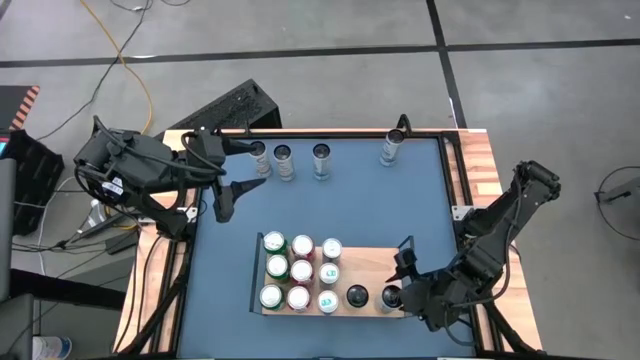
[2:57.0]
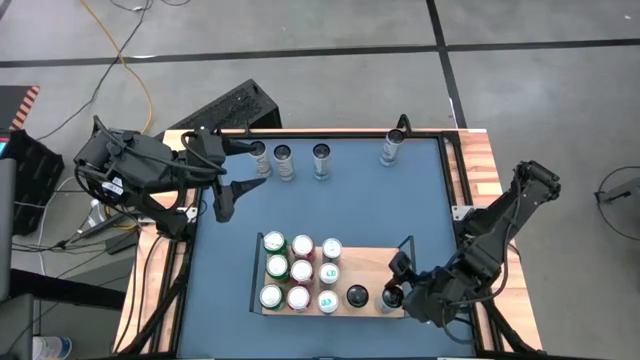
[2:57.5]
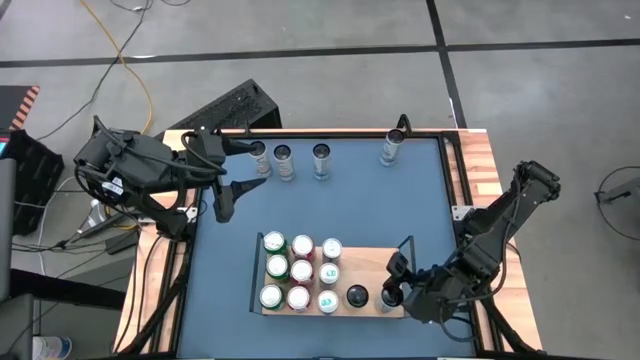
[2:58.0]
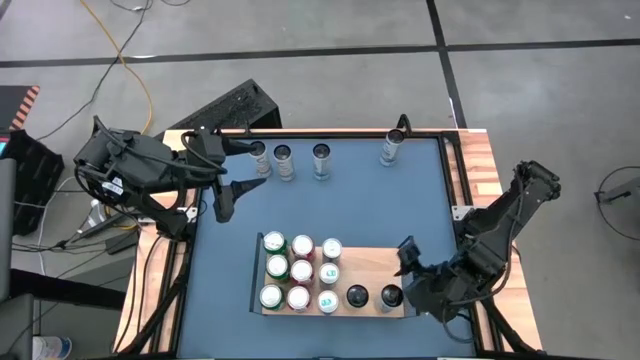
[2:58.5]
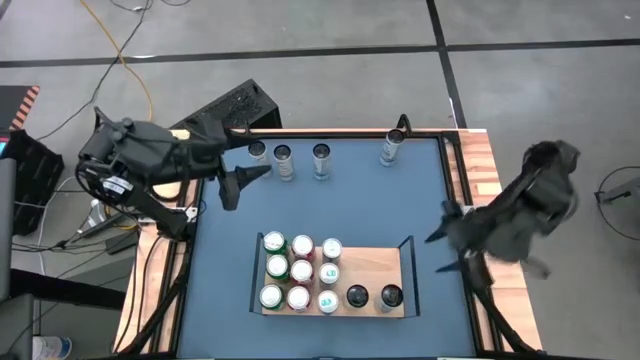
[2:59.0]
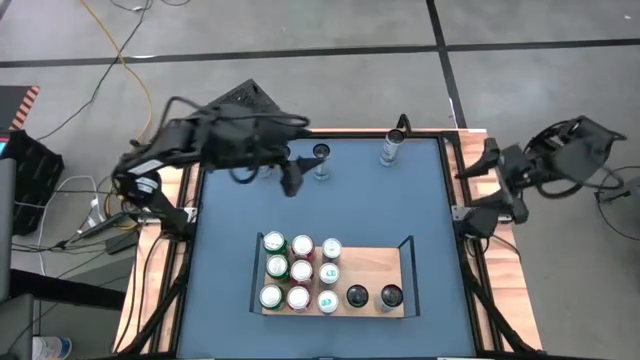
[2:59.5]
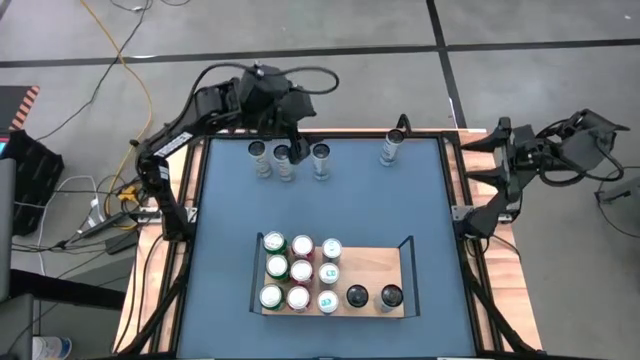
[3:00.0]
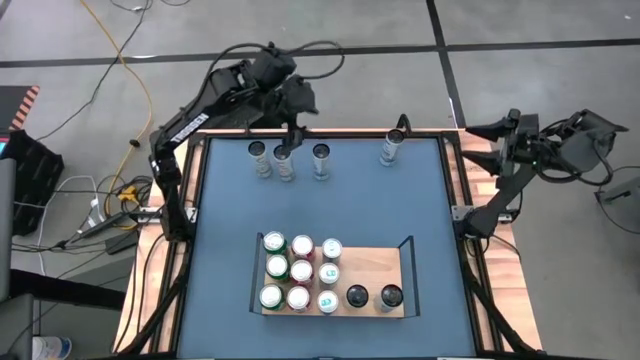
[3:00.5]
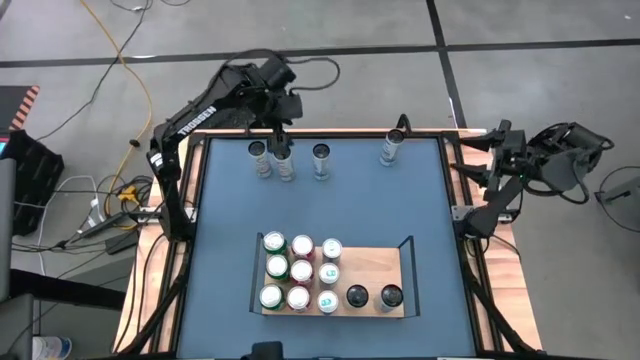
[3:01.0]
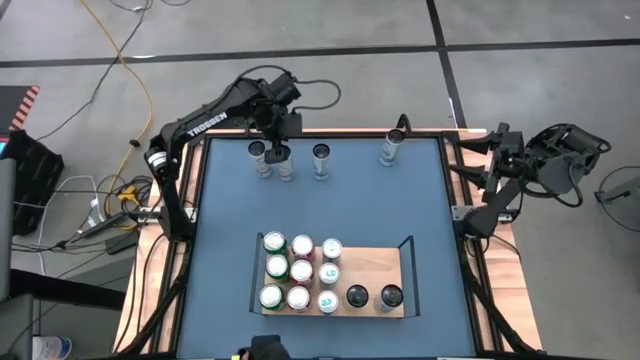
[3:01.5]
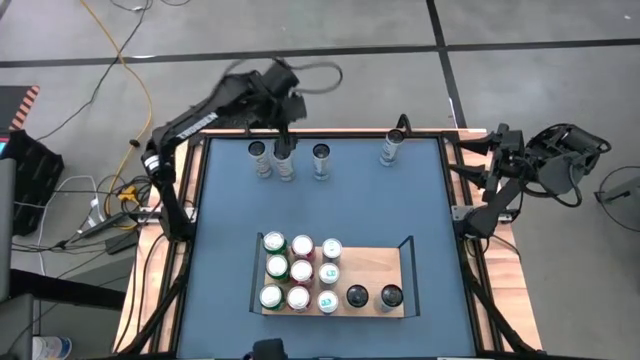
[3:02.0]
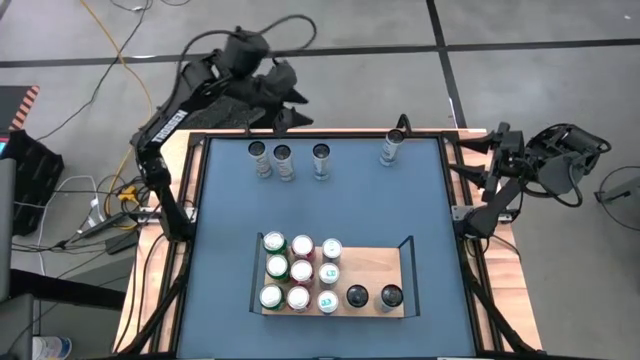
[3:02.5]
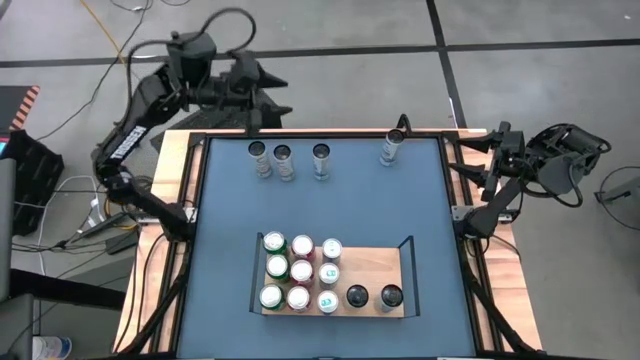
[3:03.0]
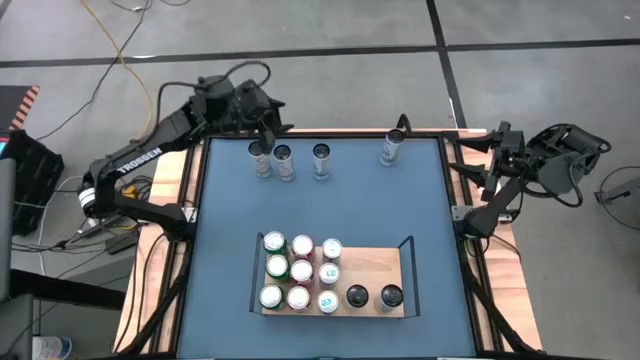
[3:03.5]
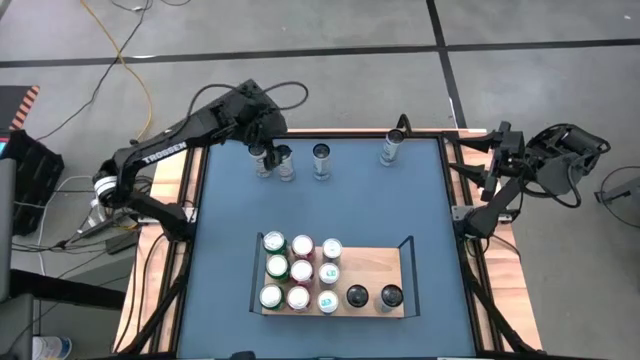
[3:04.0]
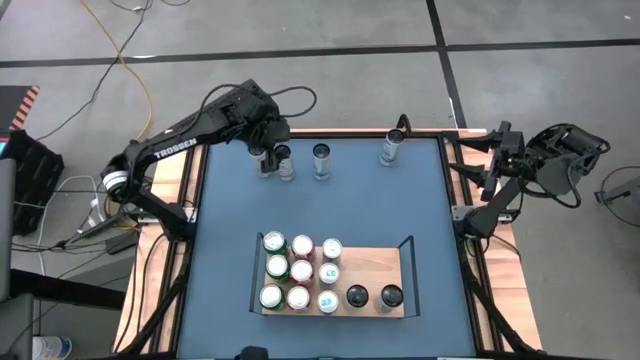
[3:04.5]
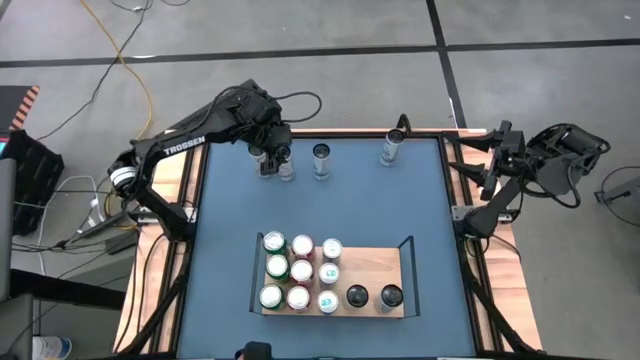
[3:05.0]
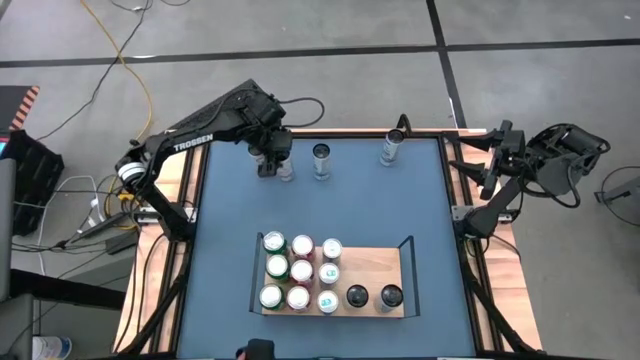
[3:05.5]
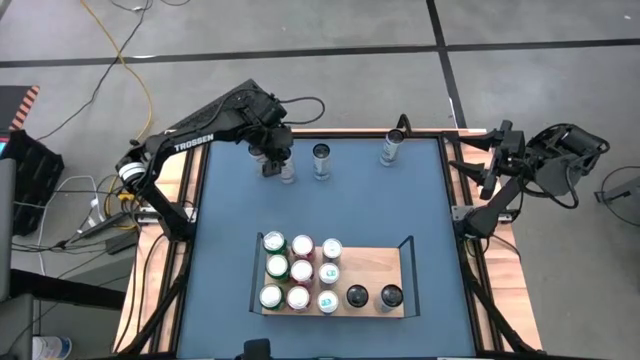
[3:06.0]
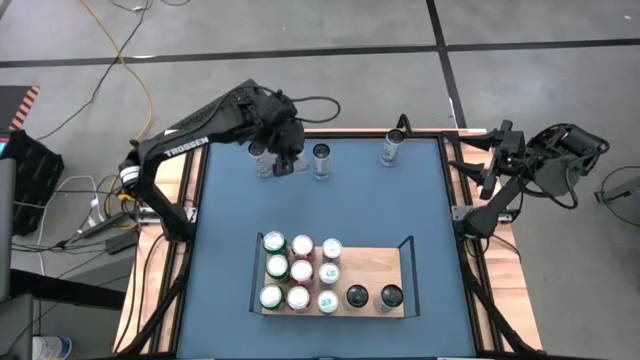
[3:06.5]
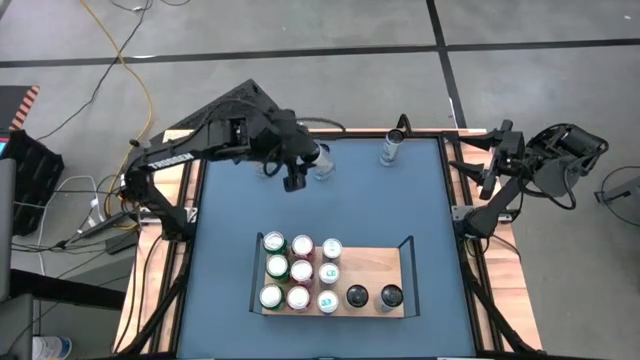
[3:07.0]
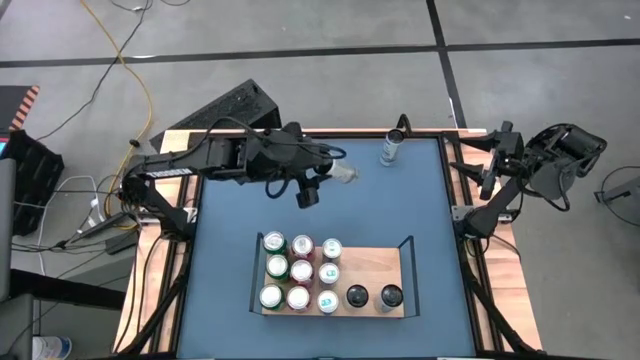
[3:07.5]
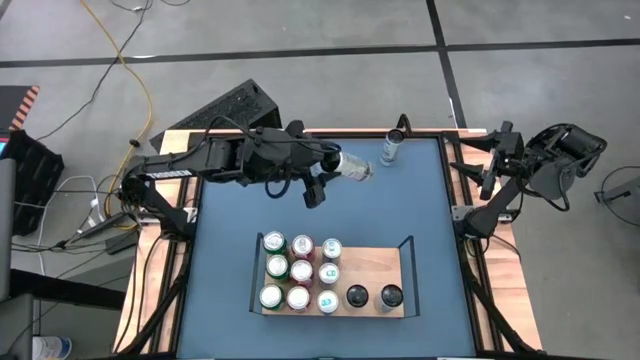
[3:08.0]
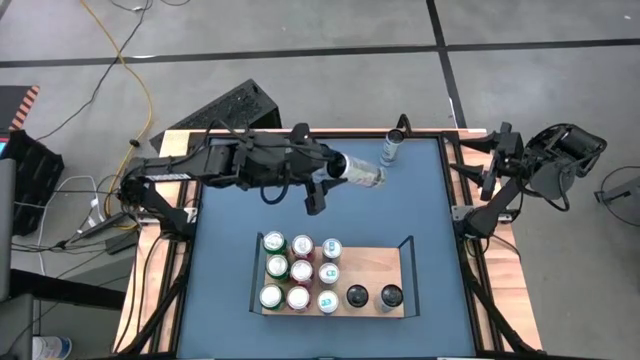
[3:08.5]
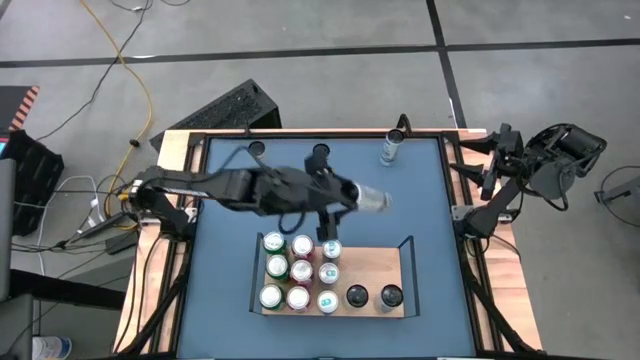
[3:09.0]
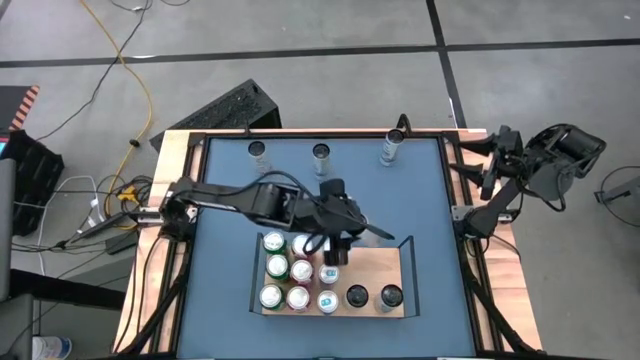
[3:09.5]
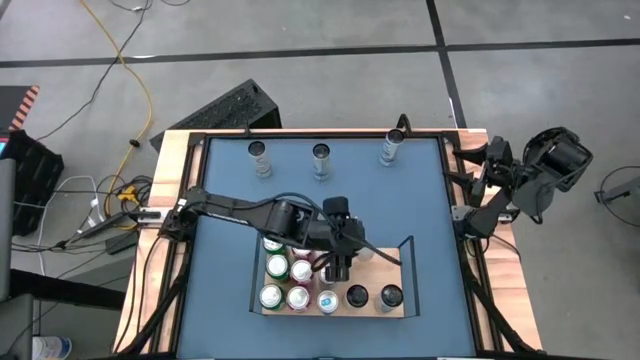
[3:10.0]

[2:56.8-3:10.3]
Task: Place canned beverage on shelf
Put the right white-yellow soda can on the shelf aligned with the other white-yellow soda can

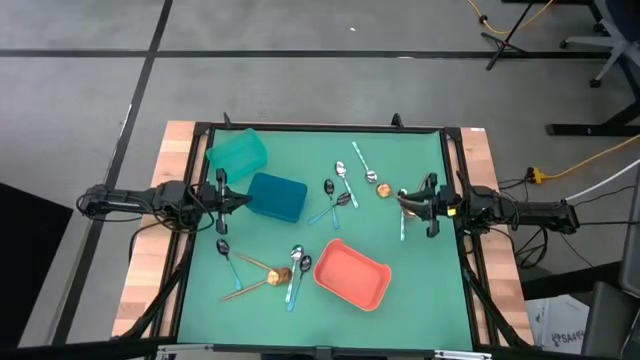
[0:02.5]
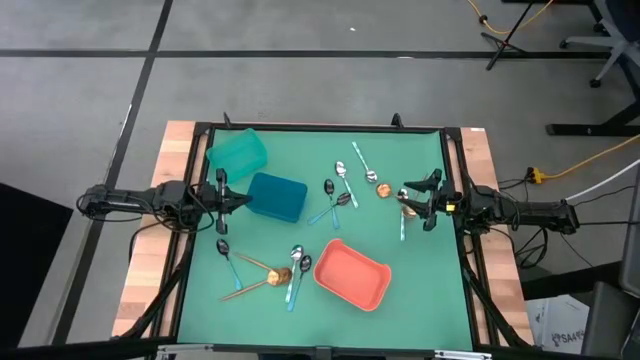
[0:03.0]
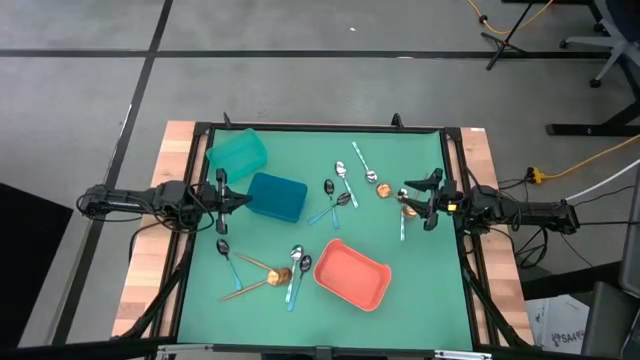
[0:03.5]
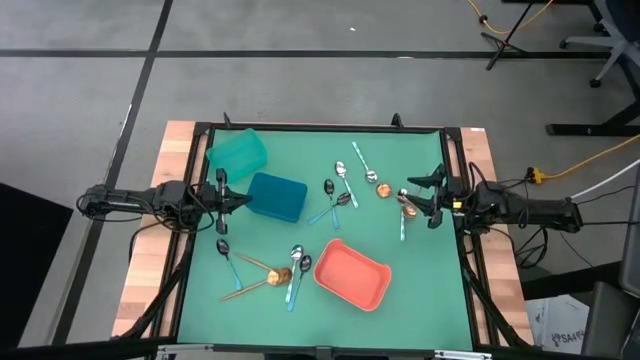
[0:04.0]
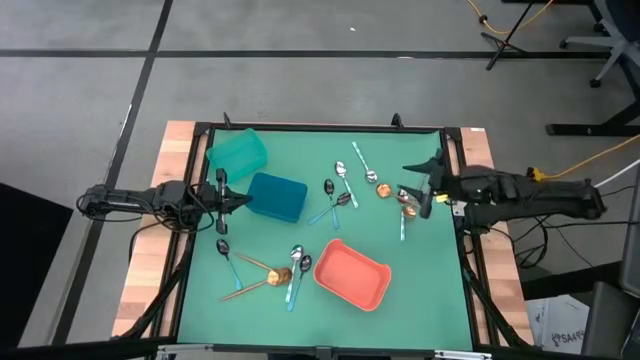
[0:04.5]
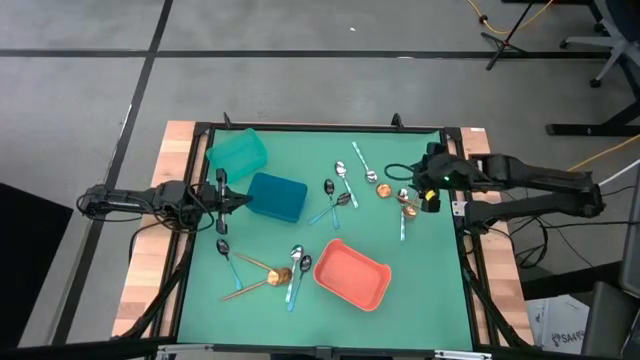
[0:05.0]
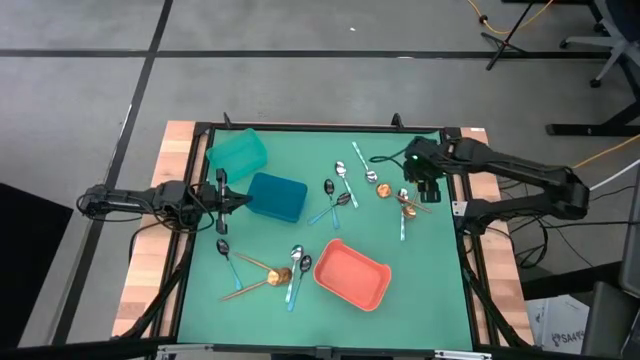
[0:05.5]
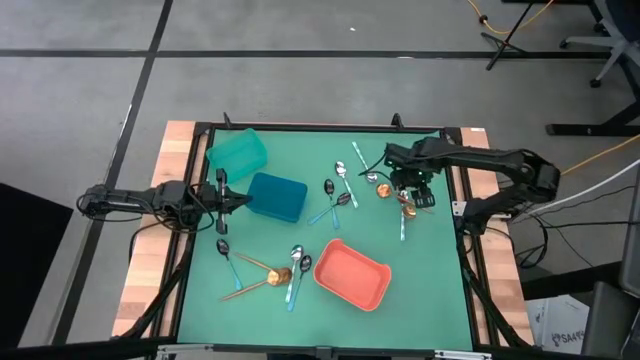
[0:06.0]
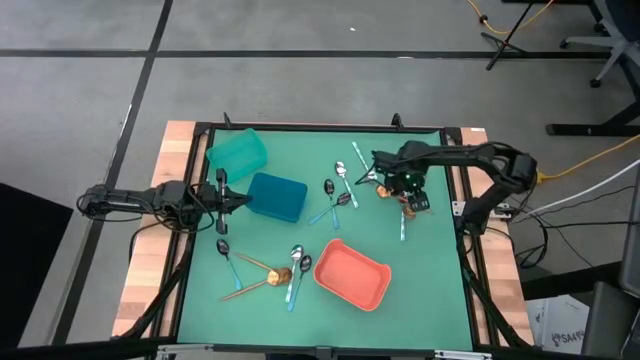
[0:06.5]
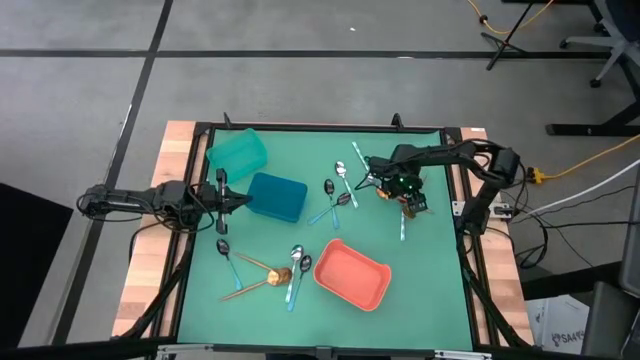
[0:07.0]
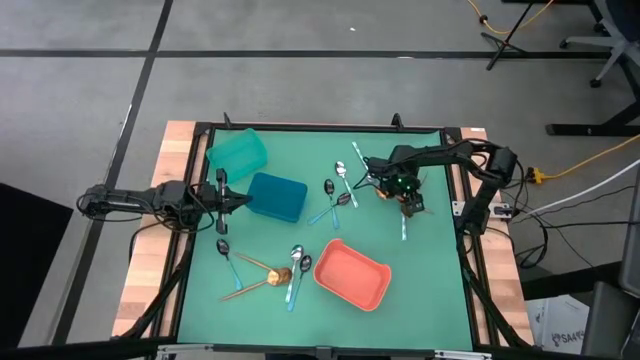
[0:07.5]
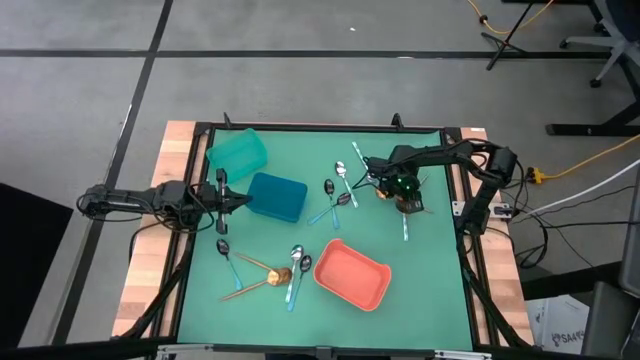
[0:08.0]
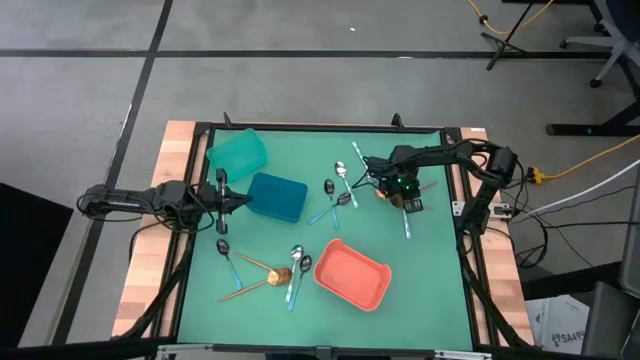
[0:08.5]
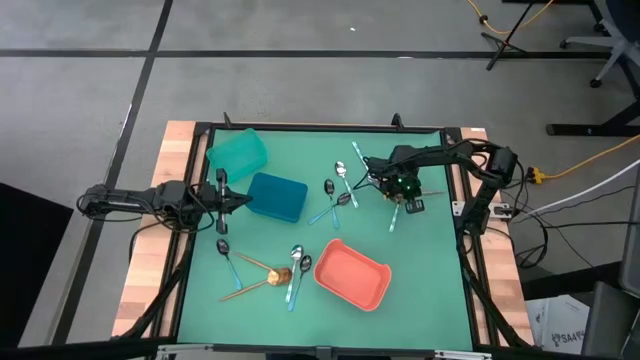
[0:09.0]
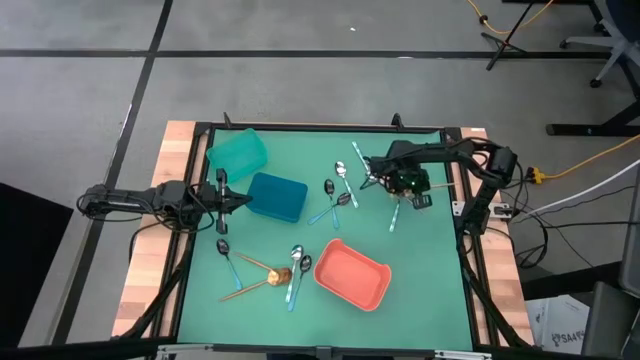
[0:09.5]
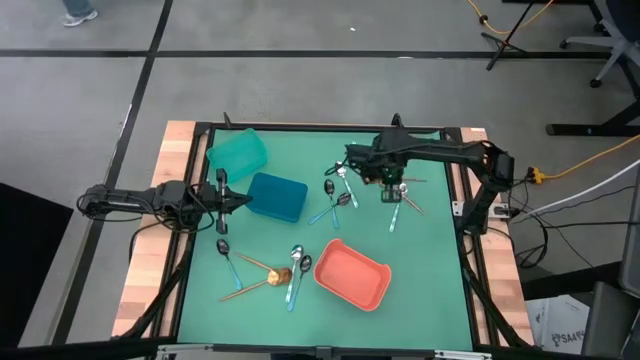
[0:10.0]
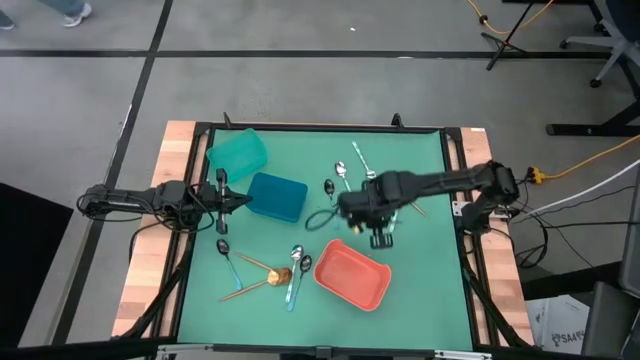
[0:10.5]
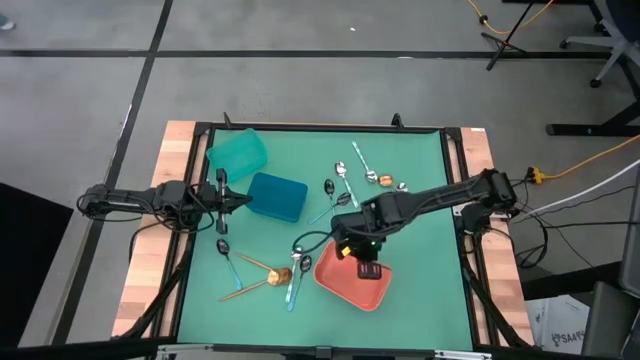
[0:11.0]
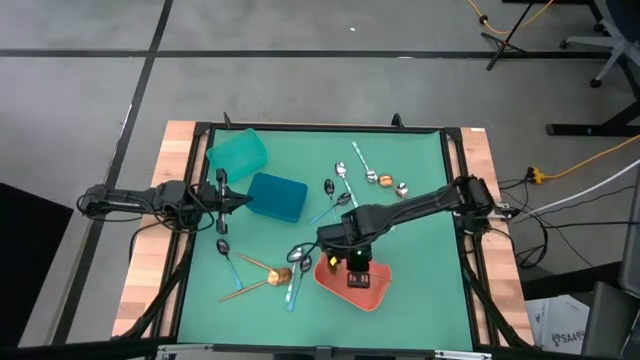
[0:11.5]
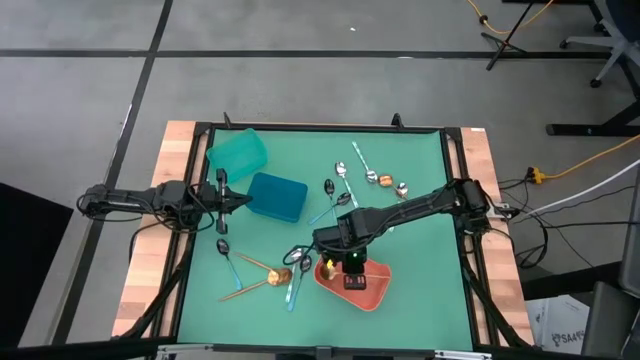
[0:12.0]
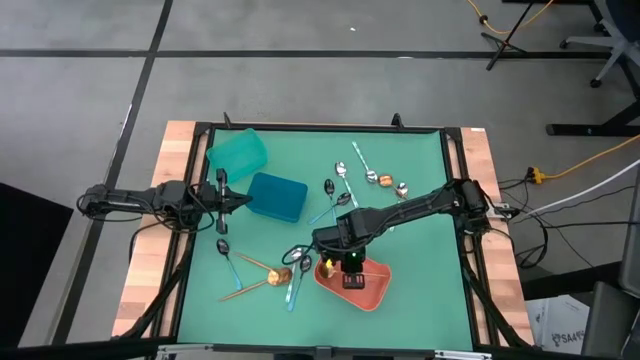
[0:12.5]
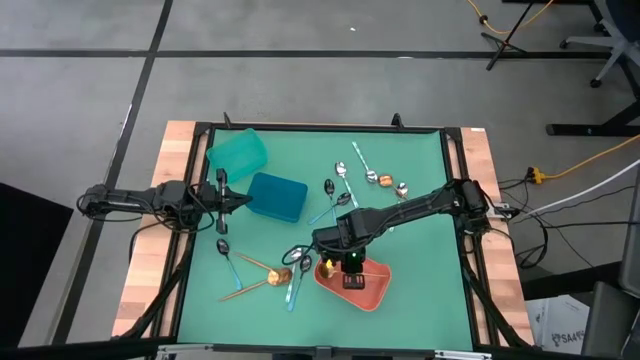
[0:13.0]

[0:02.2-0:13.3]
Task: Sort silverware by color (type)
Put the yellow spoon into the orange bin
